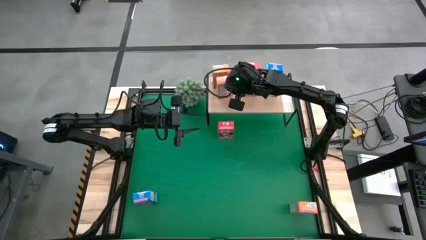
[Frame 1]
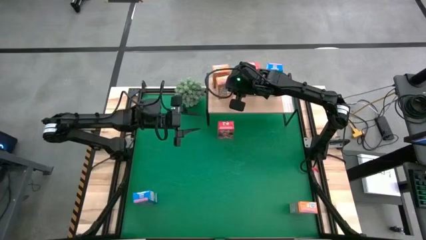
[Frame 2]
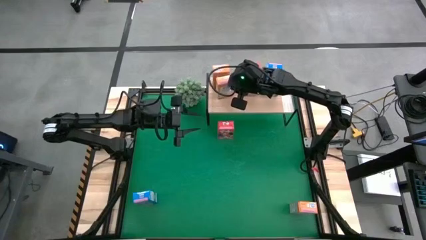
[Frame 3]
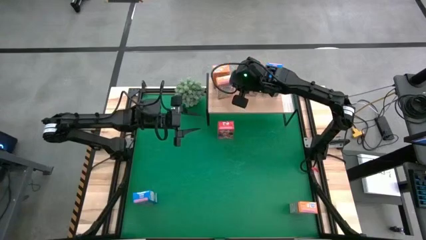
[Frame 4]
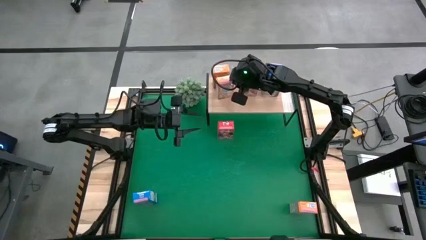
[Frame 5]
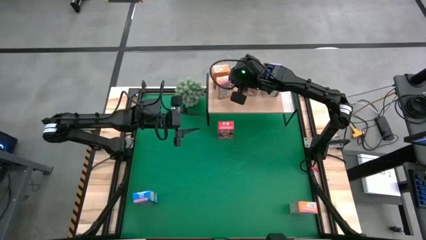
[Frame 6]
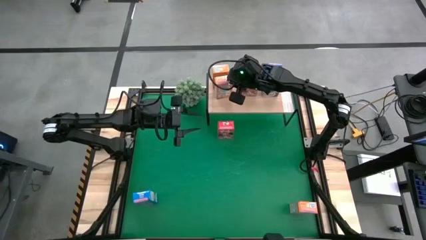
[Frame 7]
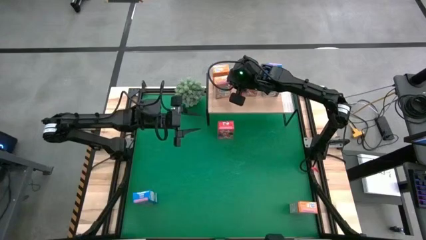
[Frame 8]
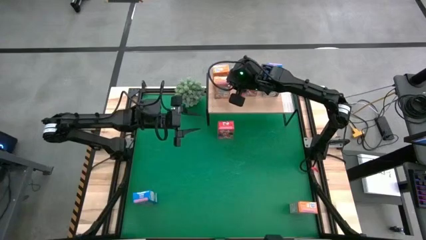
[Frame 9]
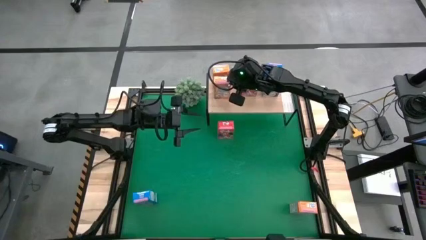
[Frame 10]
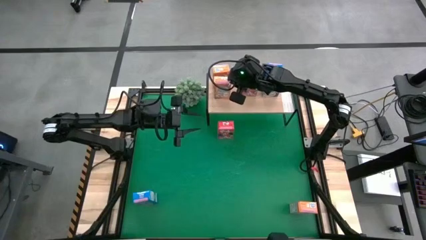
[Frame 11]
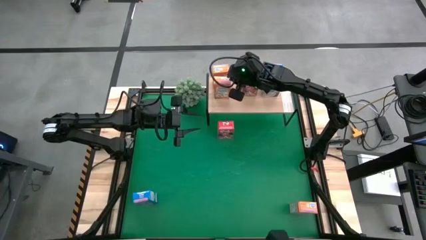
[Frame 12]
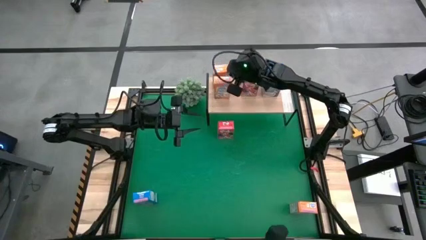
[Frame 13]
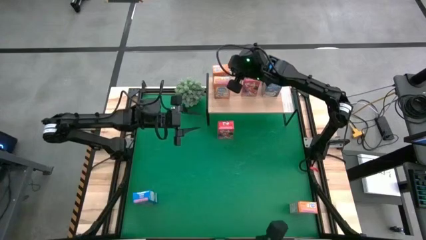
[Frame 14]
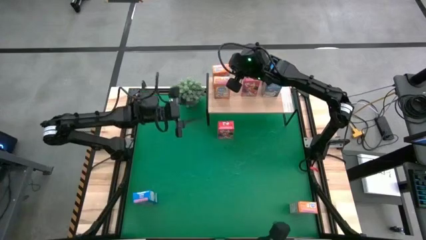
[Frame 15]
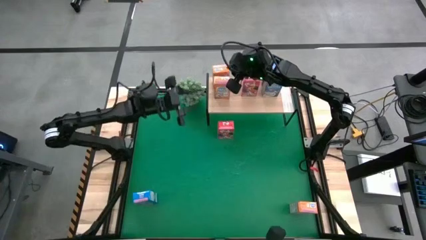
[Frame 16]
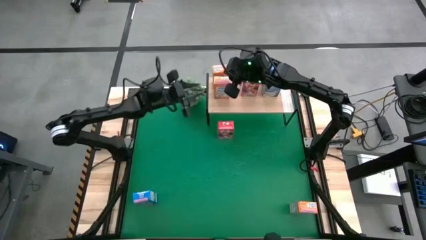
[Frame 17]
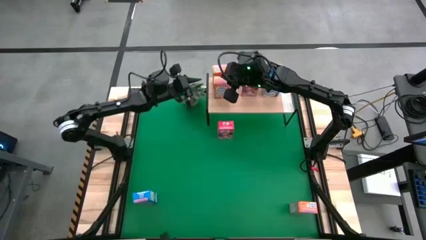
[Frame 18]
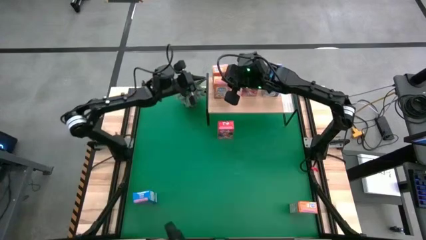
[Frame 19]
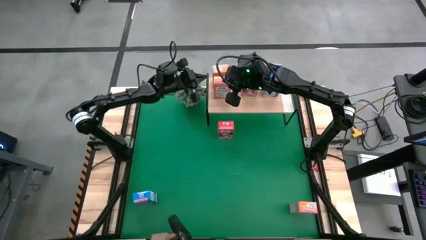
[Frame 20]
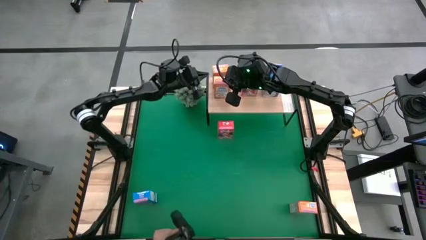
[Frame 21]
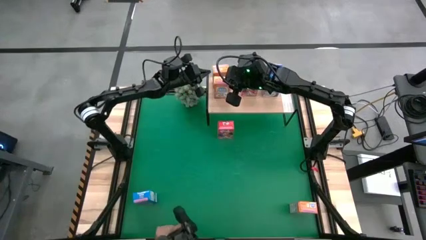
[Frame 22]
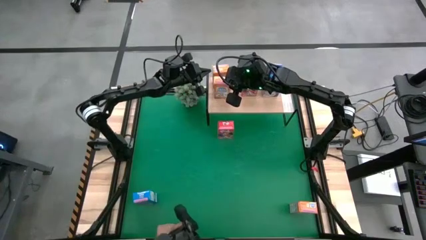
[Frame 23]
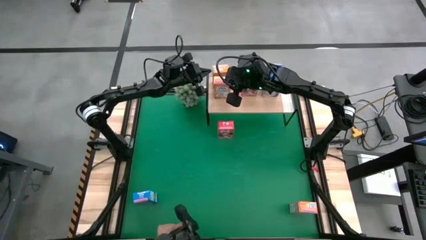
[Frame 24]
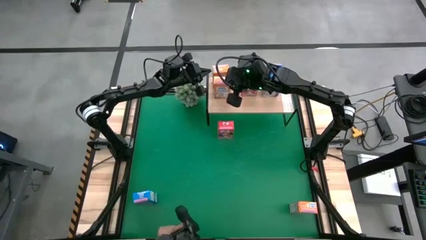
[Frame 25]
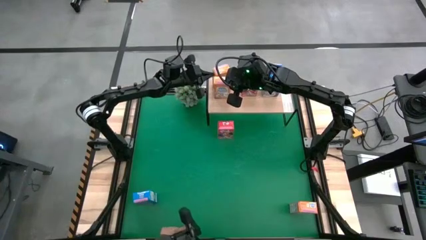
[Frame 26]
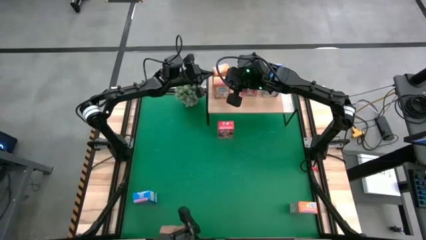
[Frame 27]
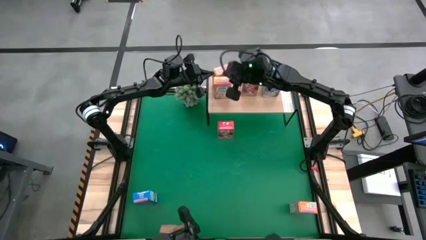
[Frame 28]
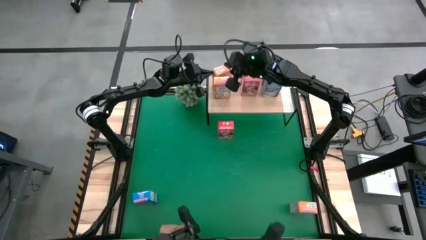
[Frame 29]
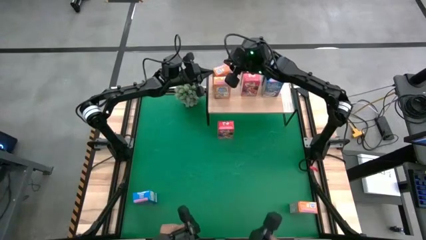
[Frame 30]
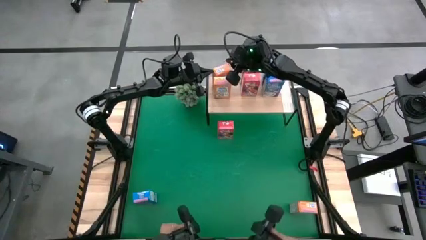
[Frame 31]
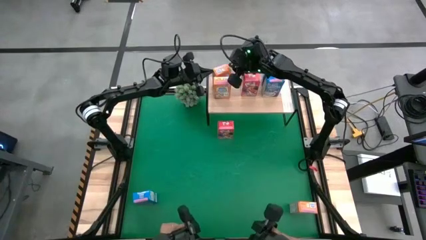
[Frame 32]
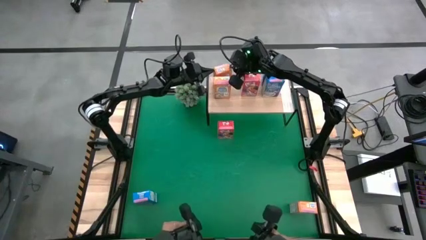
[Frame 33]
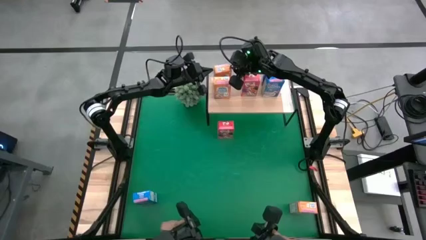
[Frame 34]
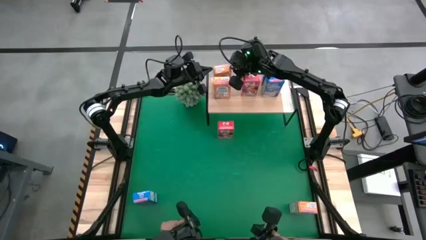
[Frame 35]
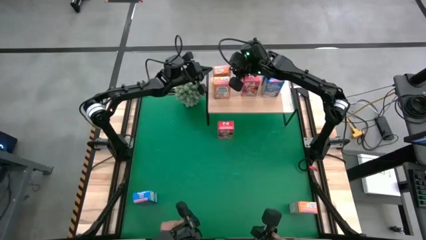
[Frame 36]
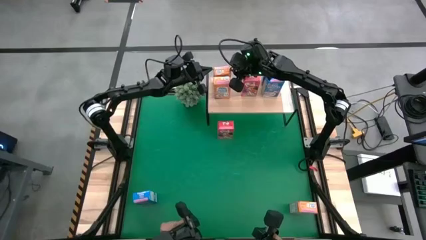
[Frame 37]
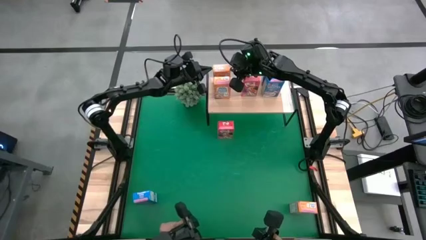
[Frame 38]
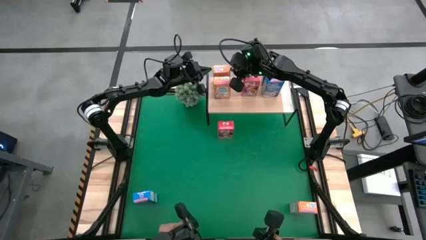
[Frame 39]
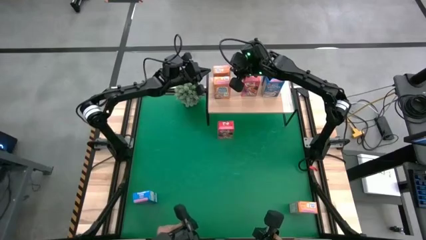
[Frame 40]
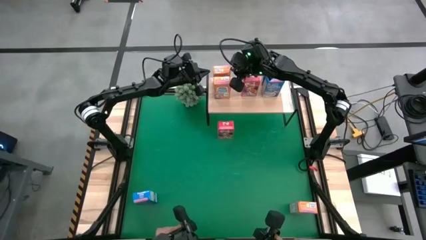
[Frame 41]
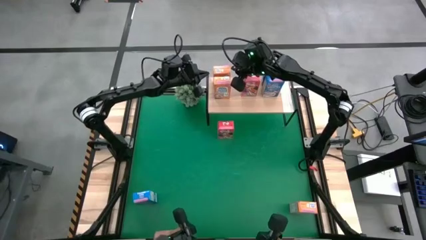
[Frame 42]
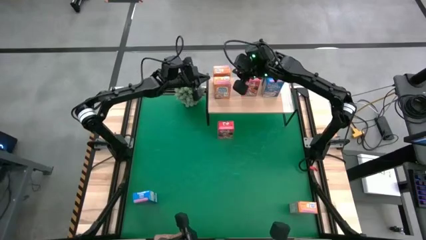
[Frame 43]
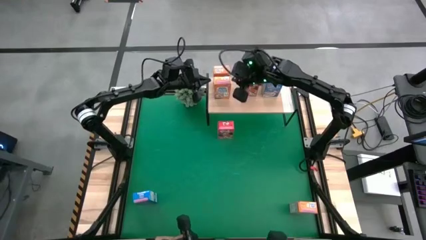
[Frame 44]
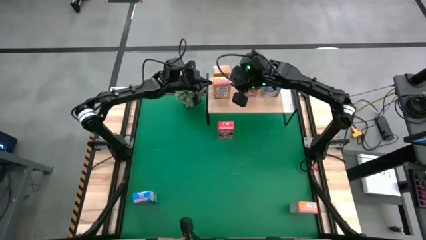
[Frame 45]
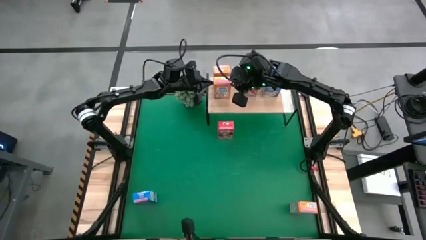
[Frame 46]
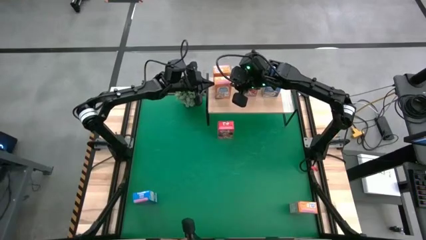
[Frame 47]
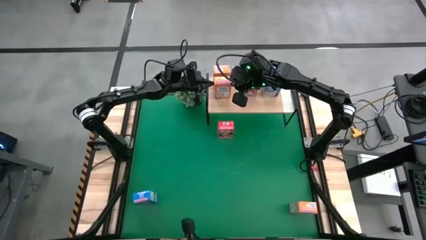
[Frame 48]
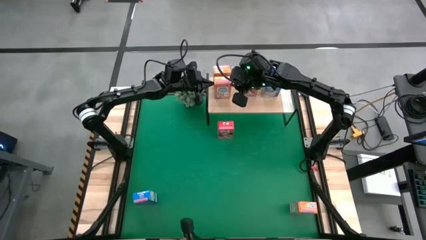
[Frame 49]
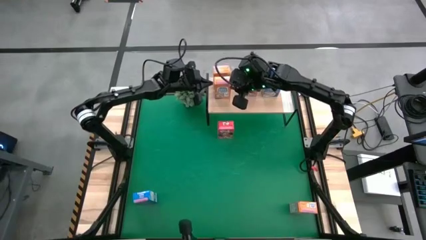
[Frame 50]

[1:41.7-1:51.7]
Task: Stack cereal on shelf
Put the left orange cereal box on the shelf aligned with the other orange cereal box

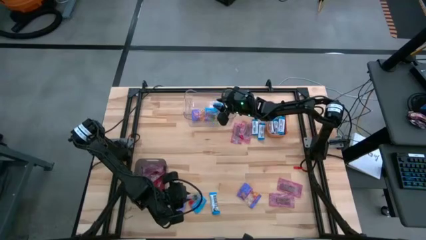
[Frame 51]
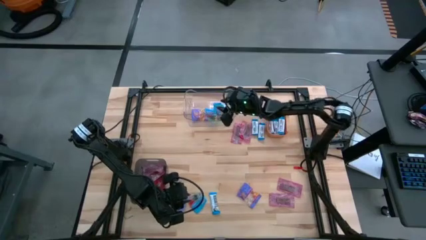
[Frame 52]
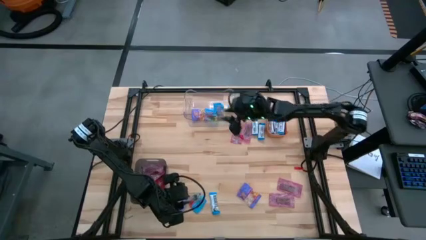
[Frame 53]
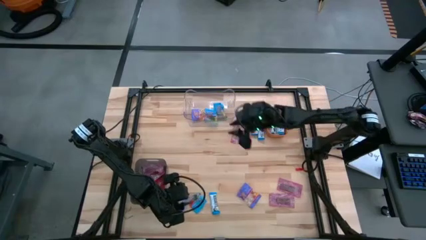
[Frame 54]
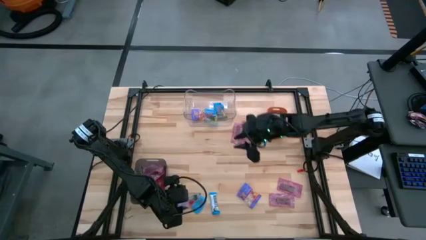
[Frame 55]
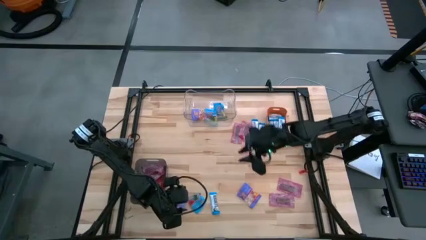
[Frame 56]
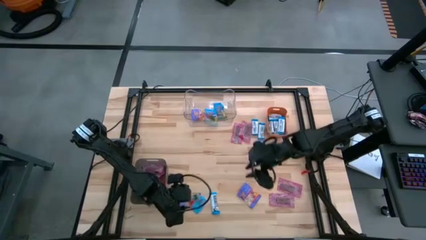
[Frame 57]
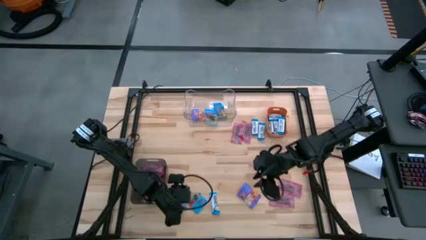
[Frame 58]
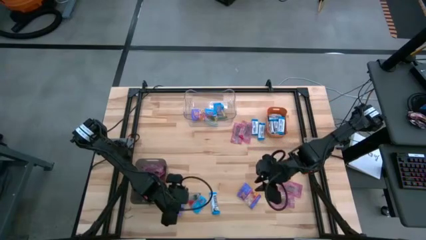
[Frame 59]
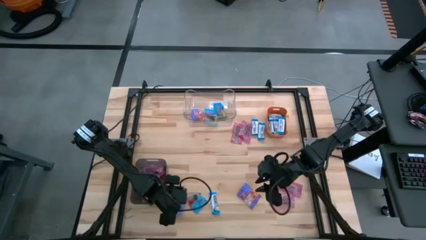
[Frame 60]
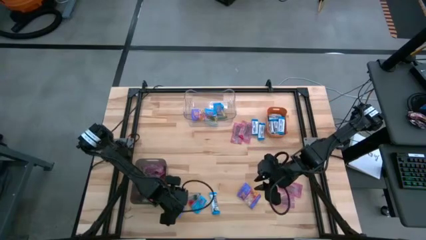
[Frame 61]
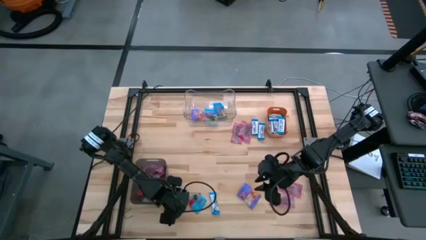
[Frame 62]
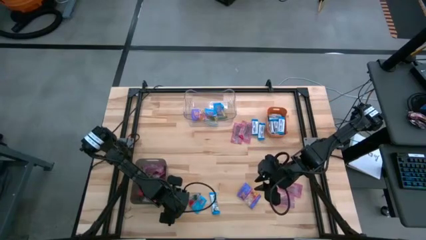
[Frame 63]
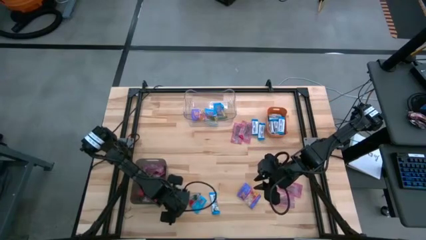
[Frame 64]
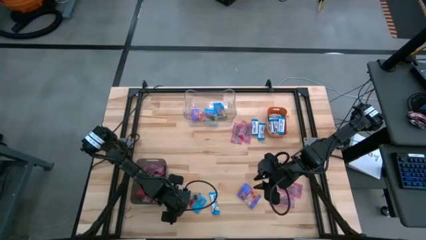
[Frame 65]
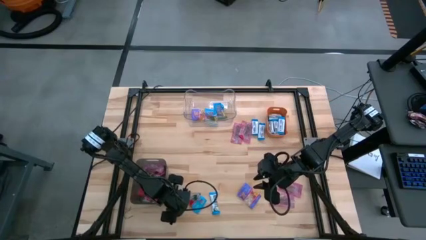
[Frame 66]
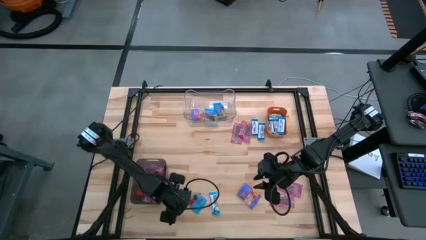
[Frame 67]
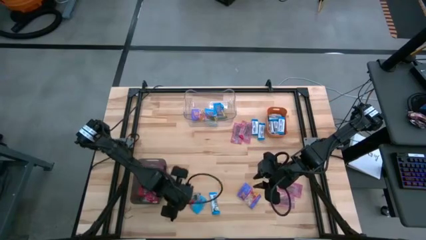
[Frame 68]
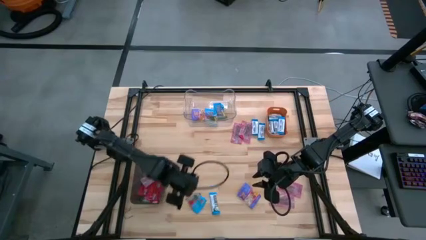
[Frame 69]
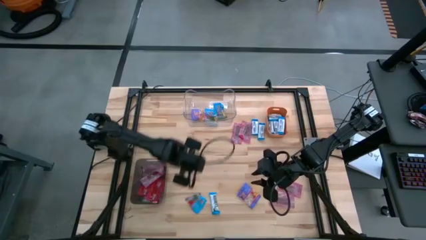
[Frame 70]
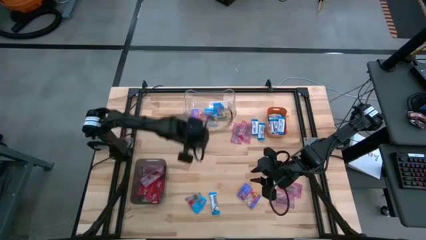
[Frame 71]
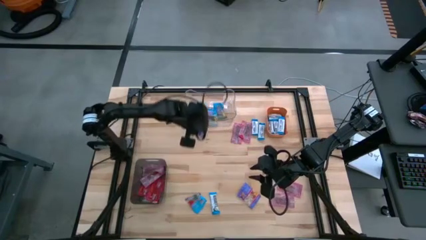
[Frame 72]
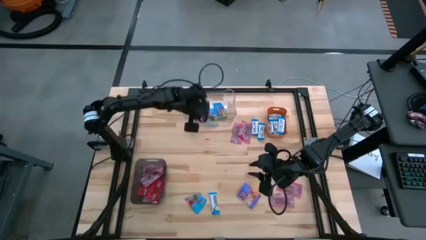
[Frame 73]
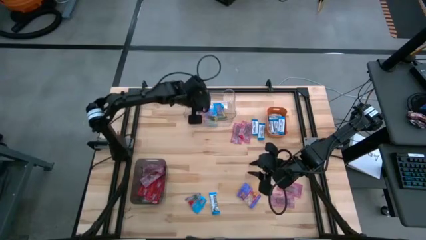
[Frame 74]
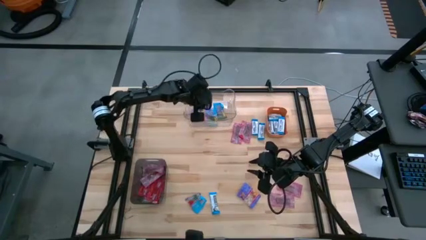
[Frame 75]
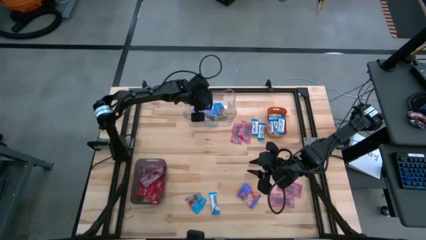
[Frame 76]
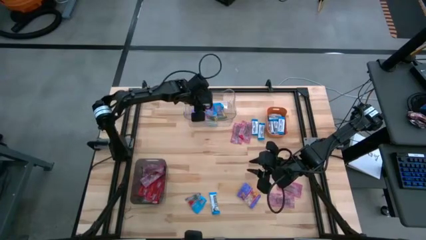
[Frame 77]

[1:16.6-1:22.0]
Task: Sort candy
Put the dark blue gummy into the transparent bin
